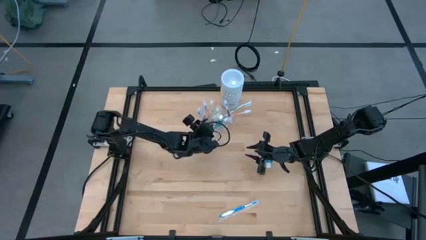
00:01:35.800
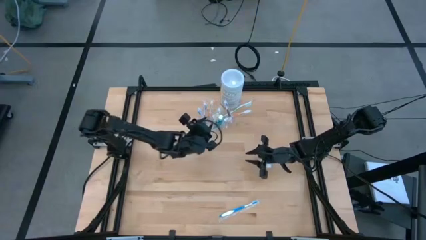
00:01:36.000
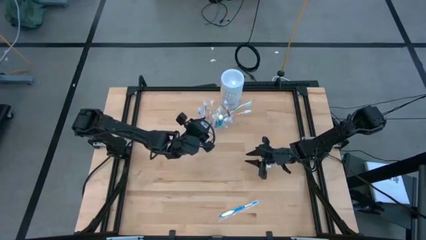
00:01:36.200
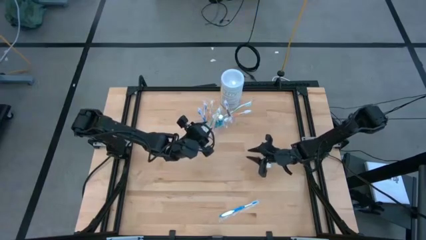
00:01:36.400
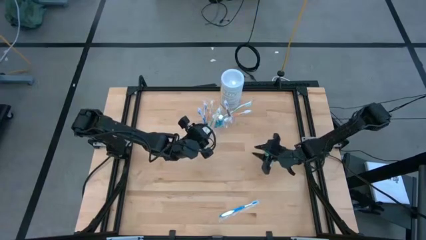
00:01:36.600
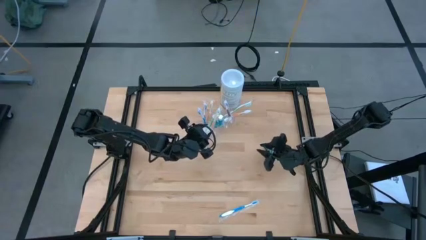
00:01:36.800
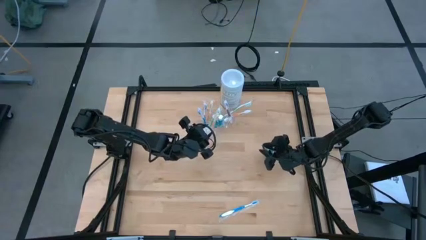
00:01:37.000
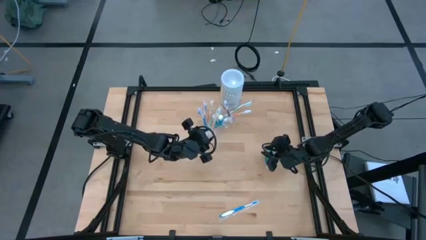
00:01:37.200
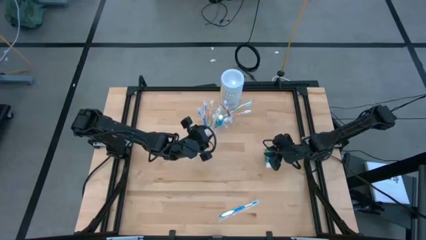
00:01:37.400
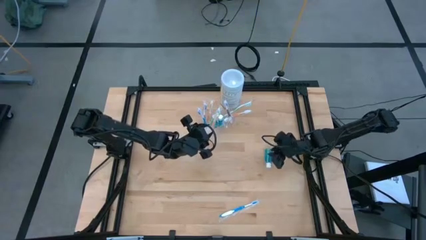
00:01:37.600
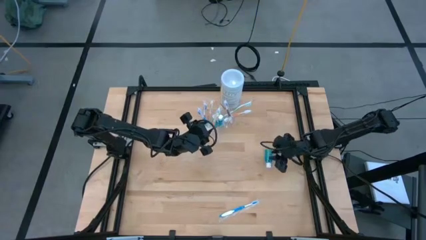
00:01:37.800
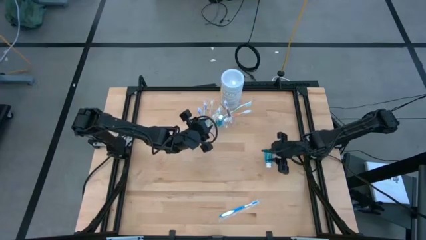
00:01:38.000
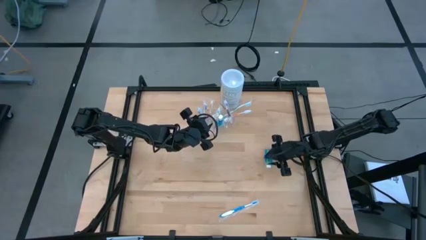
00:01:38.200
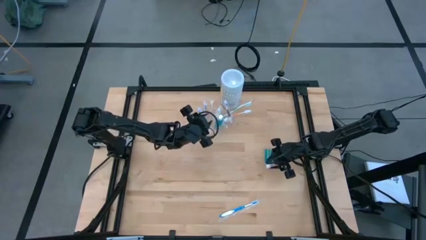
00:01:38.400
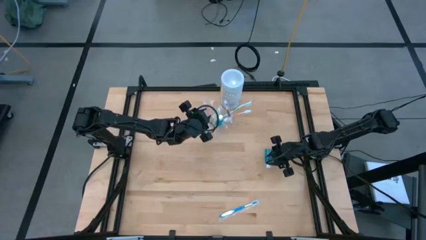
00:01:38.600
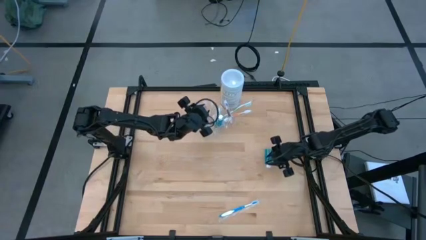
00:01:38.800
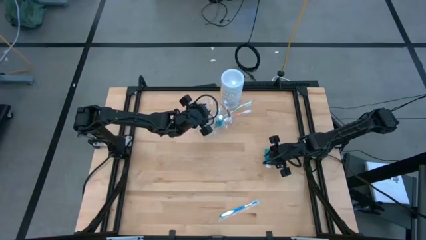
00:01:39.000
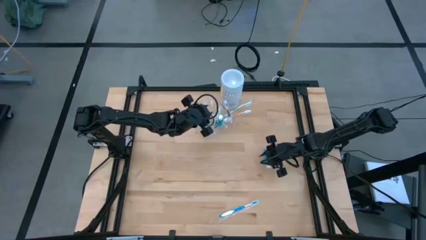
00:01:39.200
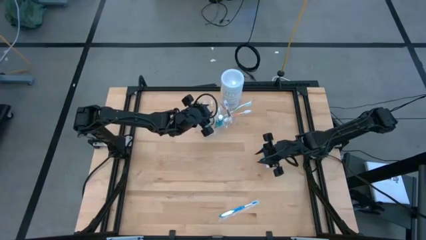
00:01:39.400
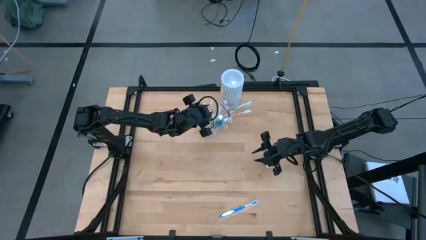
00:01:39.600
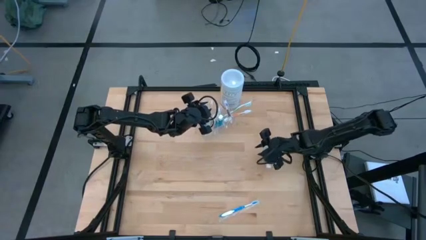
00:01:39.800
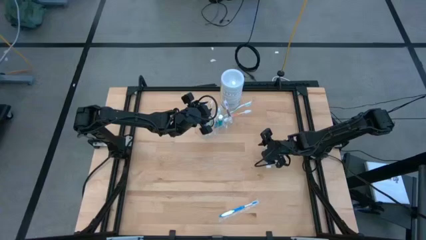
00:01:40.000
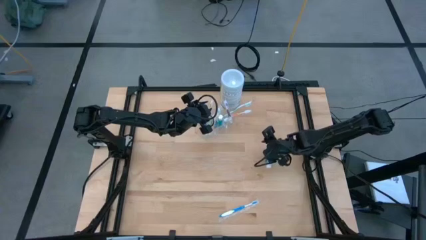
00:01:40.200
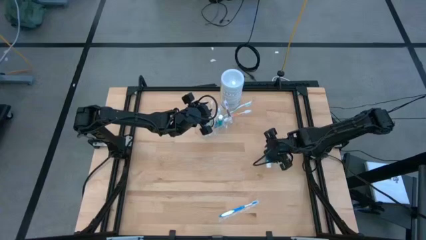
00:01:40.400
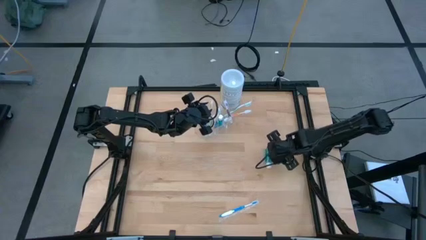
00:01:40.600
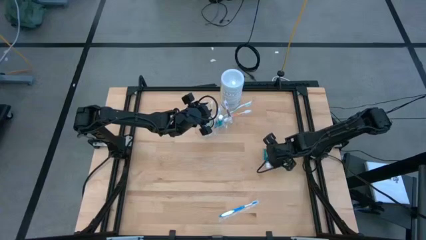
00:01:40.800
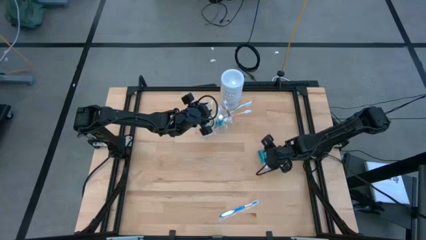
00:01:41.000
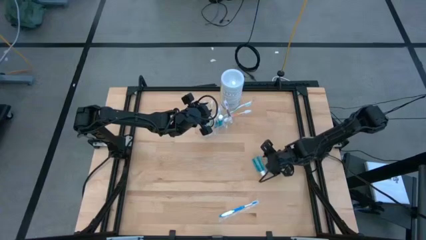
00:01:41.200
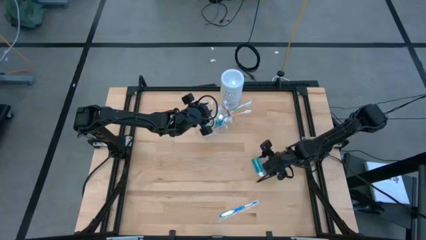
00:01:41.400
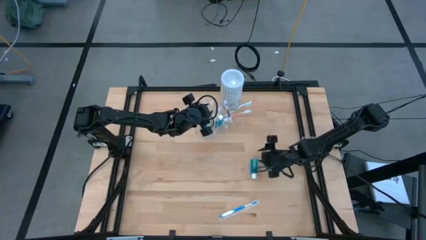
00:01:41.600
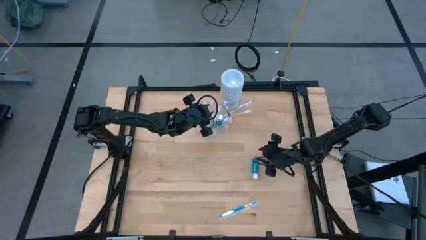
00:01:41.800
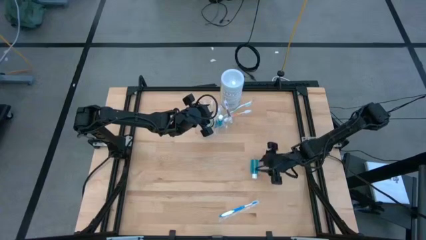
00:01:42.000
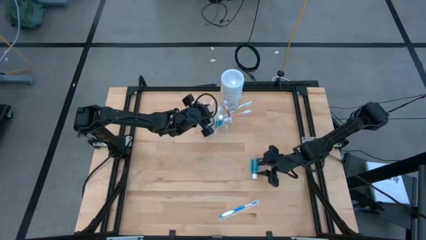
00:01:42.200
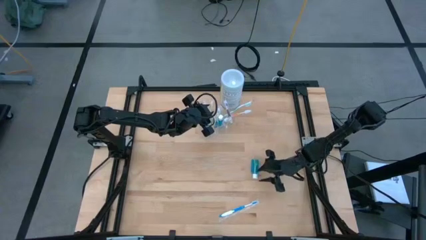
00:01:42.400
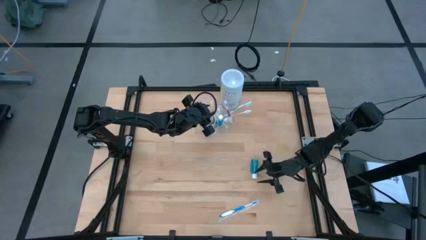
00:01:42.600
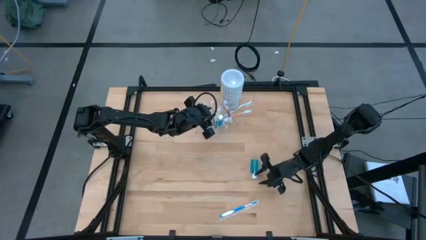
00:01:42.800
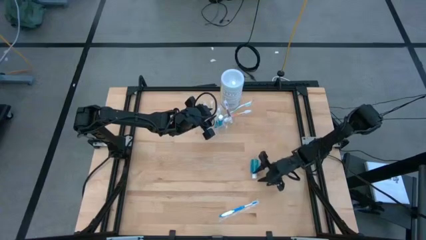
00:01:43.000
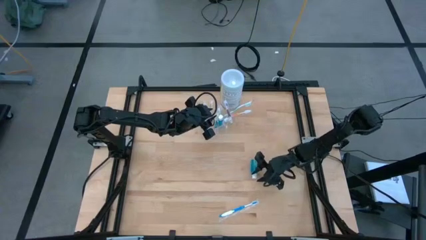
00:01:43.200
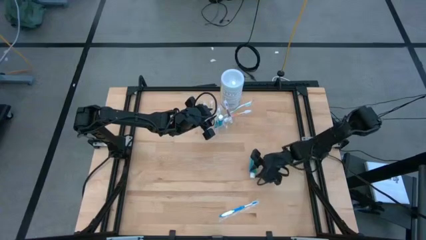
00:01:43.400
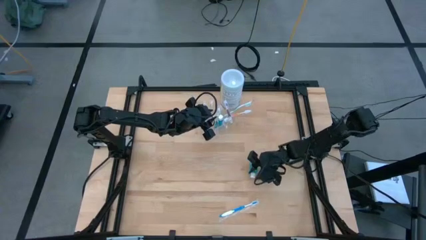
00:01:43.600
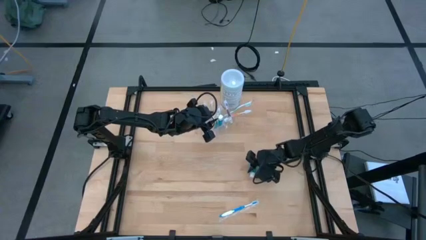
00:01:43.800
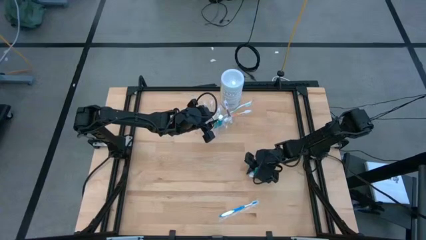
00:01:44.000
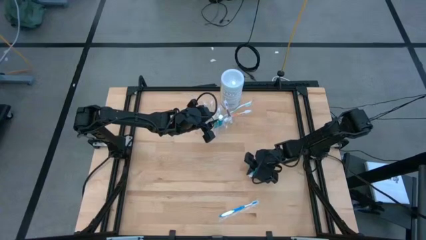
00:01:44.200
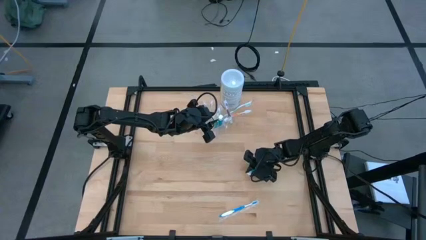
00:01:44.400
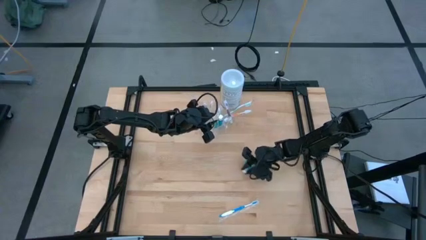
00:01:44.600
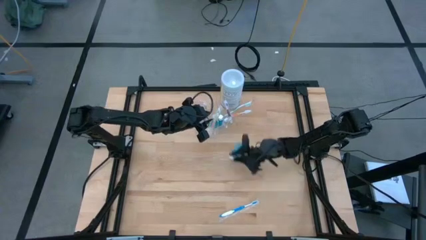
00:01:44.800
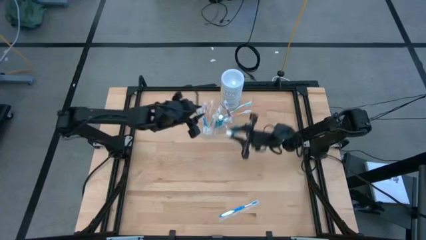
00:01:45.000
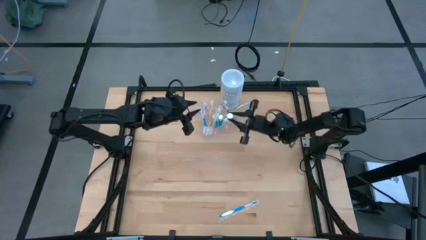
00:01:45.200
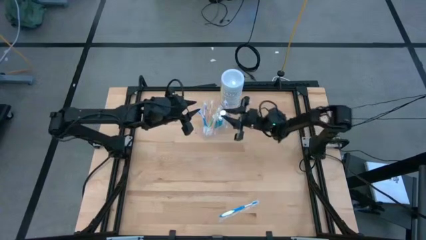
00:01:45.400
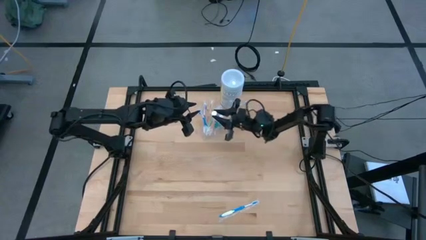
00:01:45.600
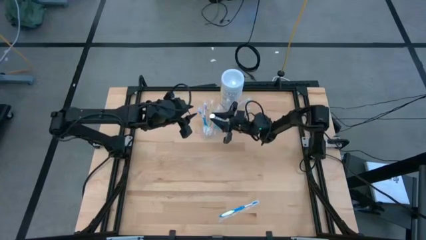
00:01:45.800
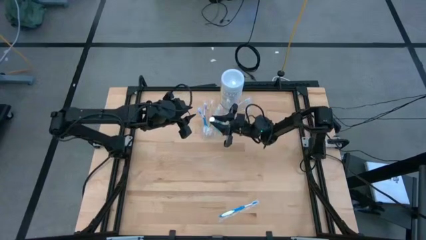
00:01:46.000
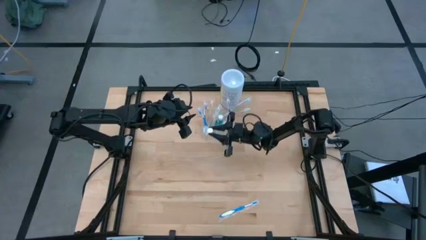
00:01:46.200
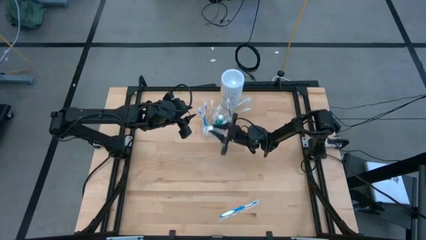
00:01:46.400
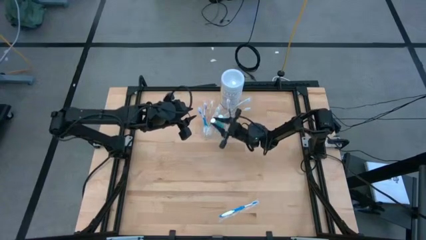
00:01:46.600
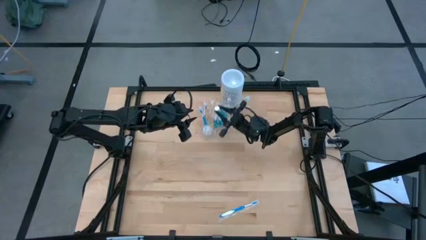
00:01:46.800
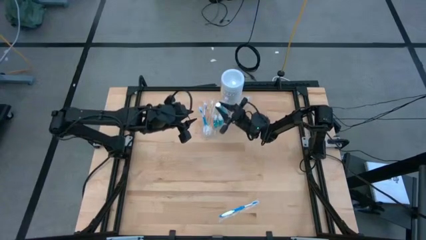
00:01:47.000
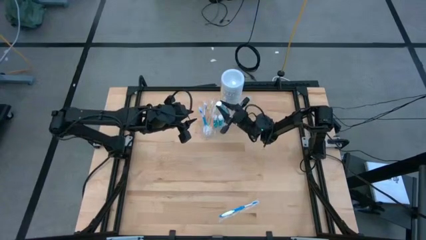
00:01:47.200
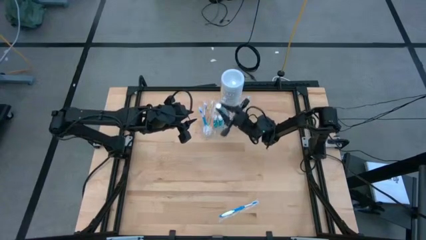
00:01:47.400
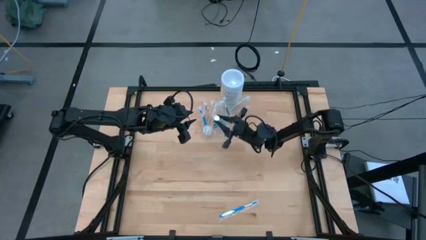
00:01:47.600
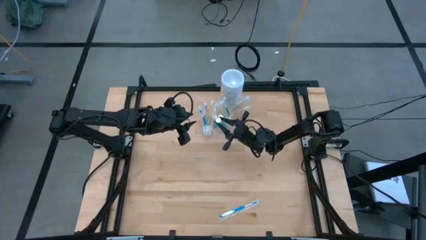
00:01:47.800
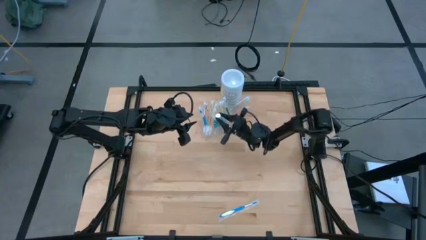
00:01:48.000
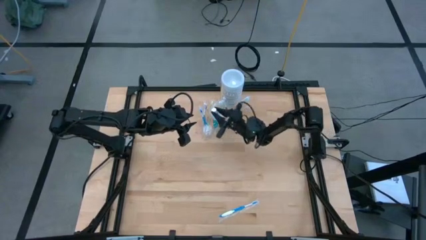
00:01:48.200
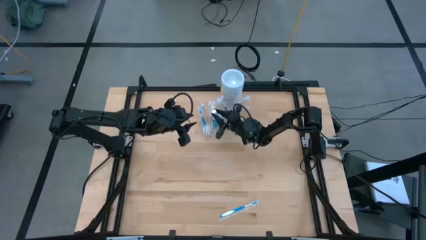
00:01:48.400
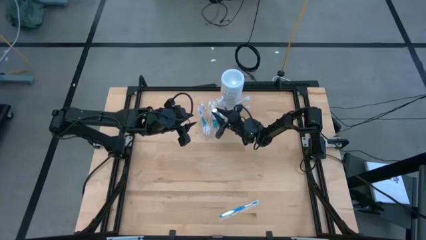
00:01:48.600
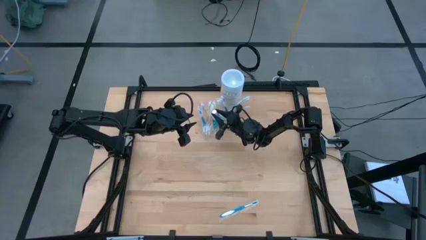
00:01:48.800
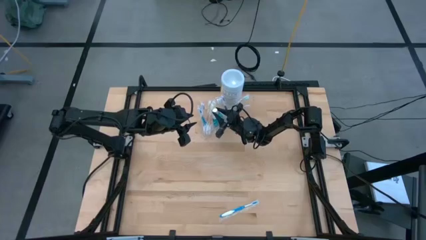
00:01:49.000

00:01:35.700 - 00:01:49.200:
Task: Pick & Place toothbrushing station
Put the blue mouthwash into the transparent organizer

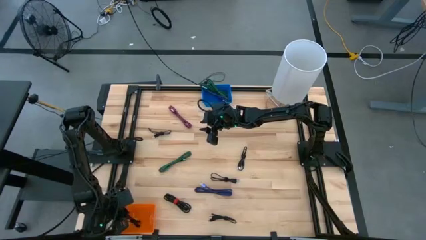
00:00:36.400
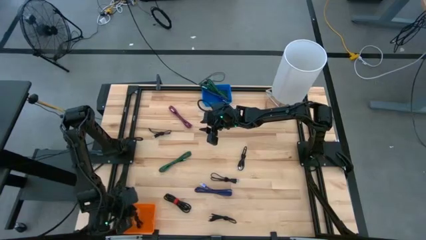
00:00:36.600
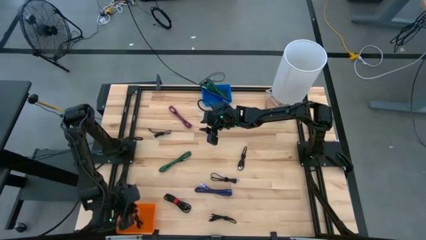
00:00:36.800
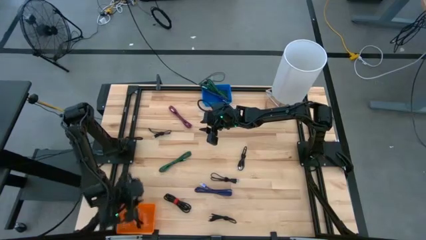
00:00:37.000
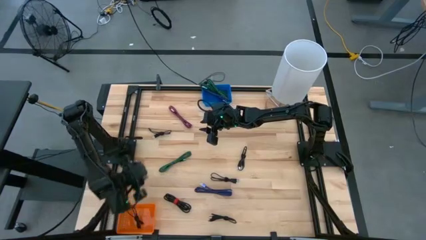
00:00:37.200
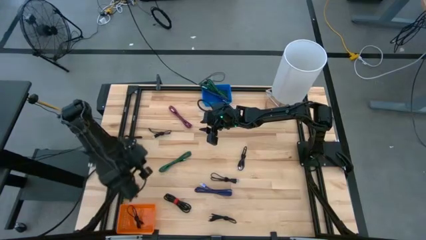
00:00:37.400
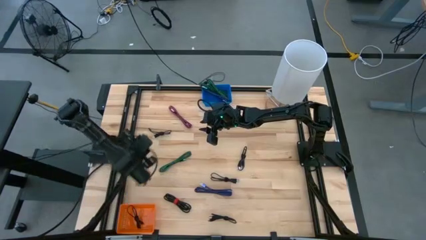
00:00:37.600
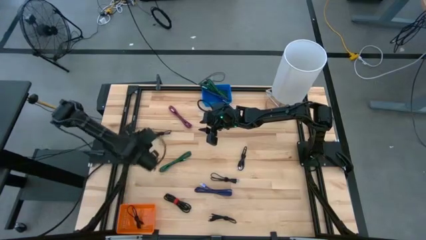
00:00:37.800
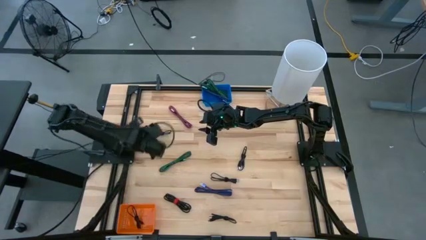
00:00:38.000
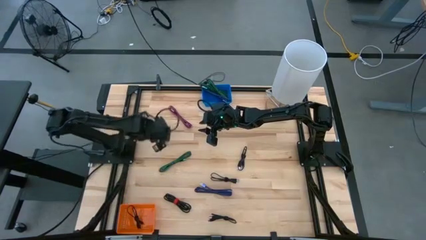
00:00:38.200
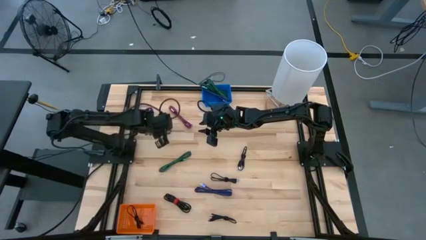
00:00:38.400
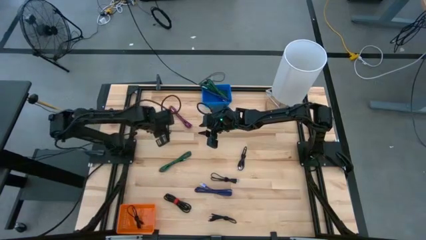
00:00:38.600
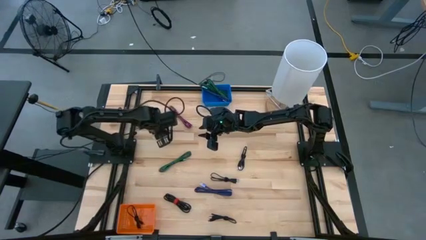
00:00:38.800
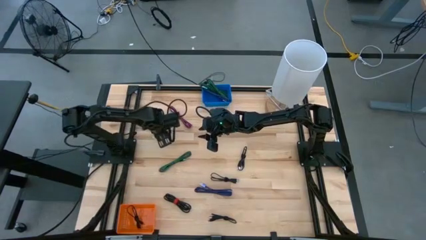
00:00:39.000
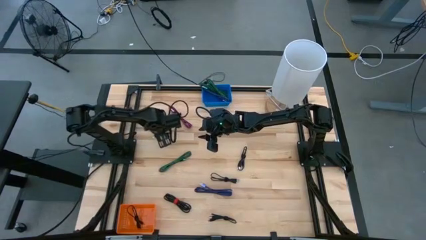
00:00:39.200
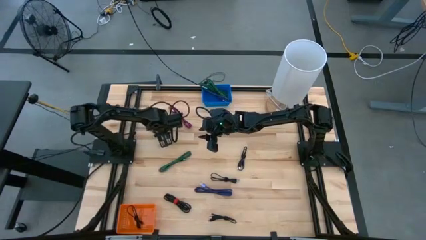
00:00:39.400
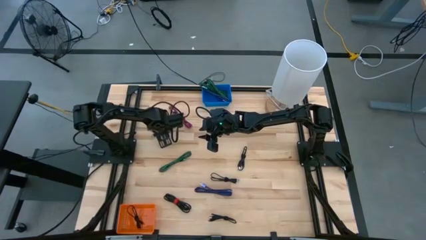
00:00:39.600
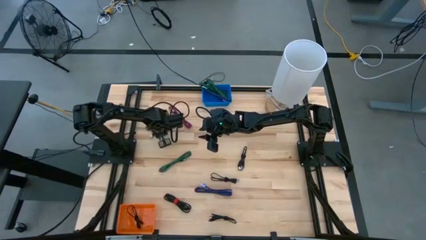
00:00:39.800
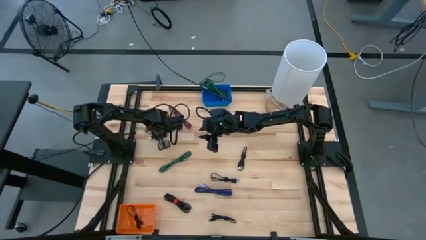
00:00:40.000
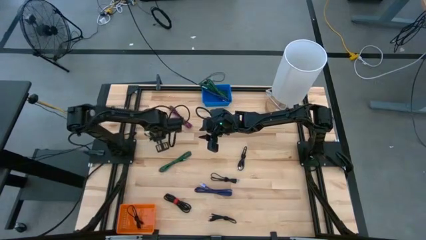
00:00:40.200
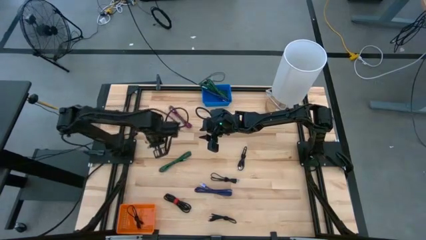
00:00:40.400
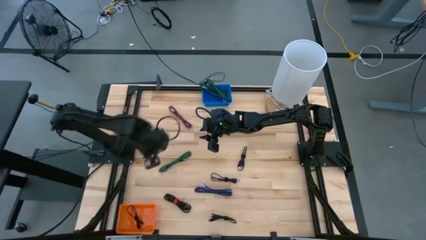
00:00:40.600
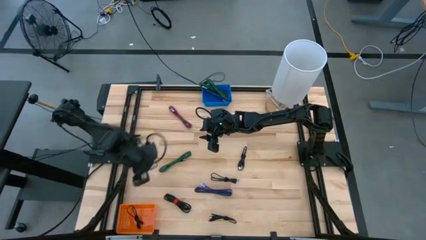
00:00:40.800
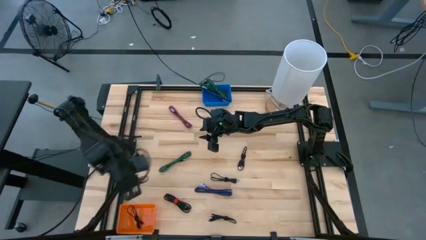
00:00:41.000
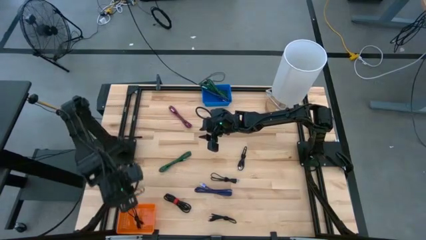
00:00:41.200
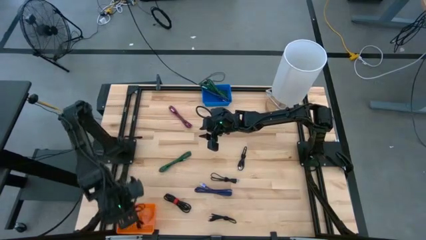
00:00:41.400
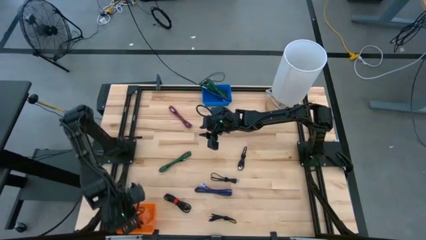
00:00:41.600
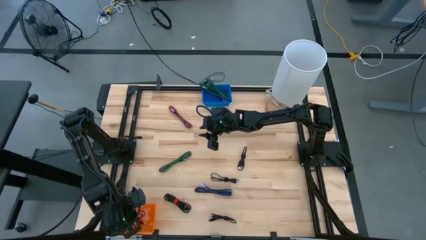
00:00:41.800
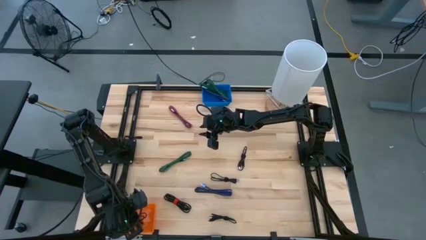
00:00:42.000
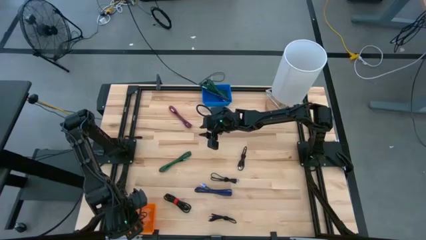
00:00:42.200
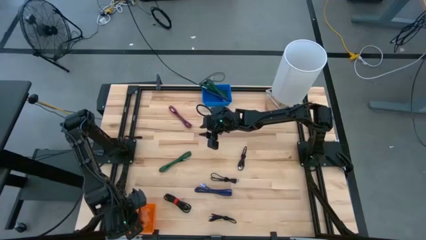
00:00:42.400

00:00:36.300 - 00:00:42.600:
Task: Pick & Place USB Port
Put the black charger cable into the orange basket
